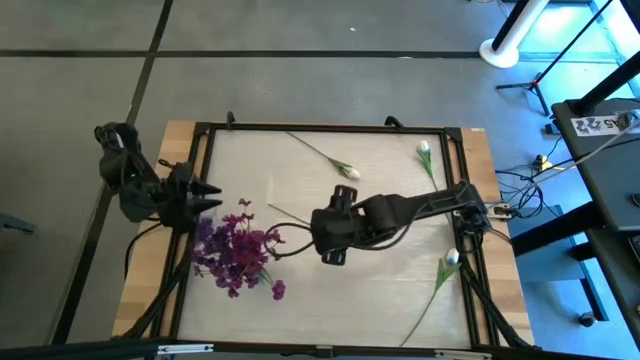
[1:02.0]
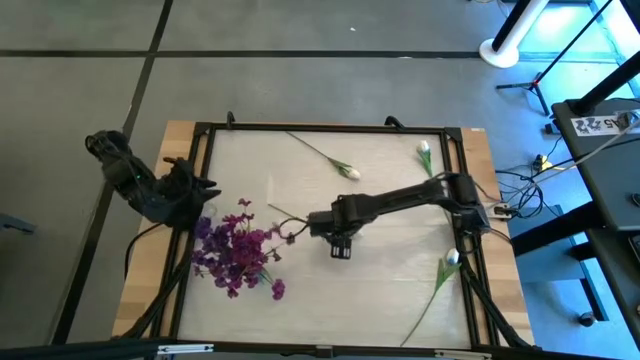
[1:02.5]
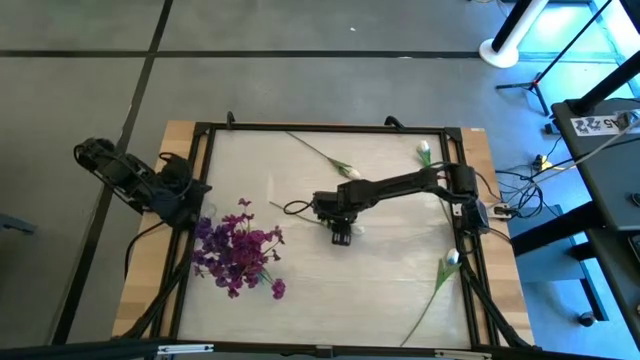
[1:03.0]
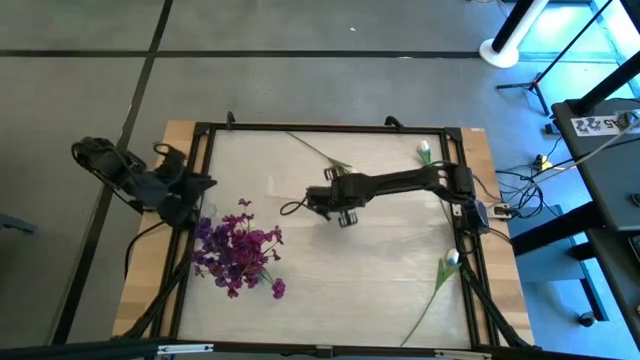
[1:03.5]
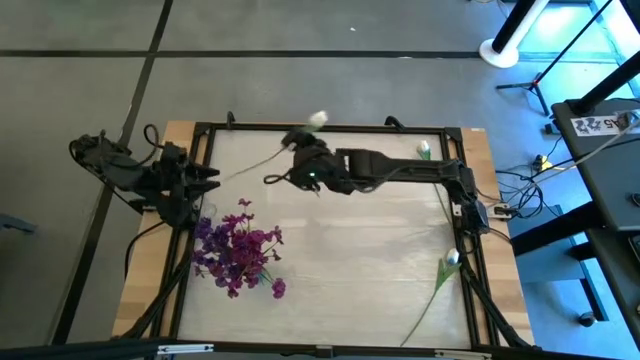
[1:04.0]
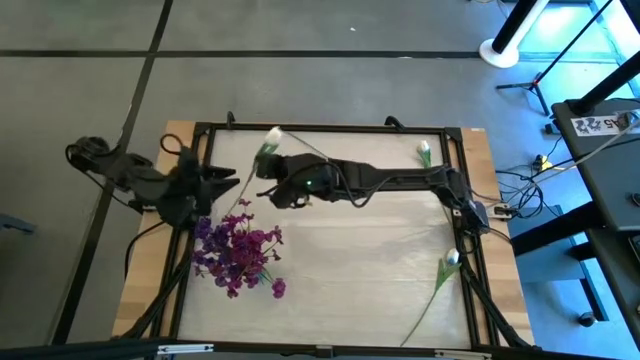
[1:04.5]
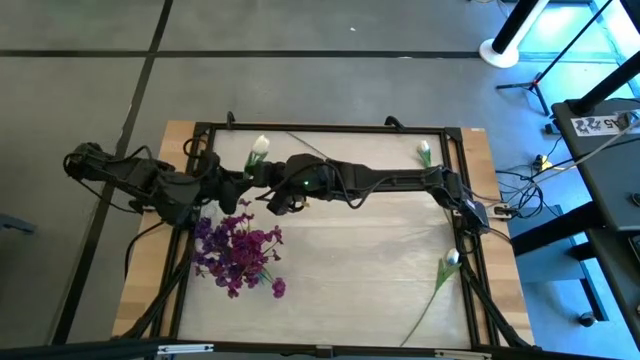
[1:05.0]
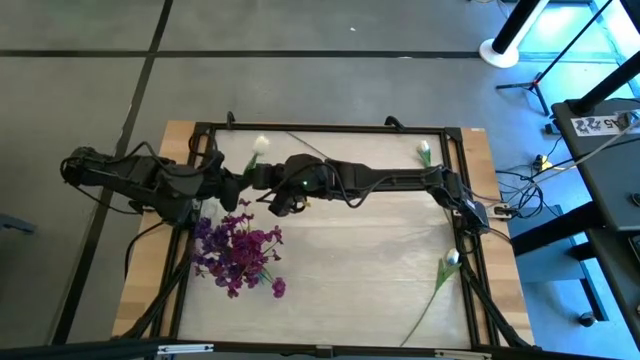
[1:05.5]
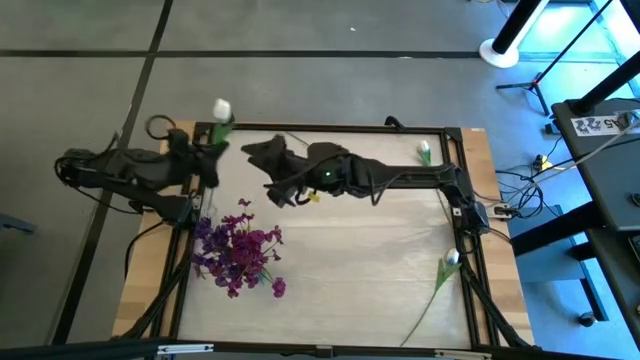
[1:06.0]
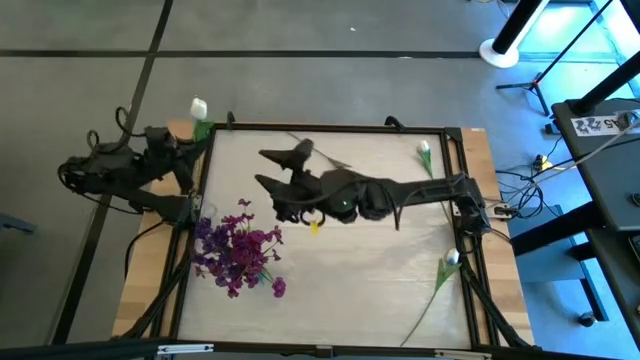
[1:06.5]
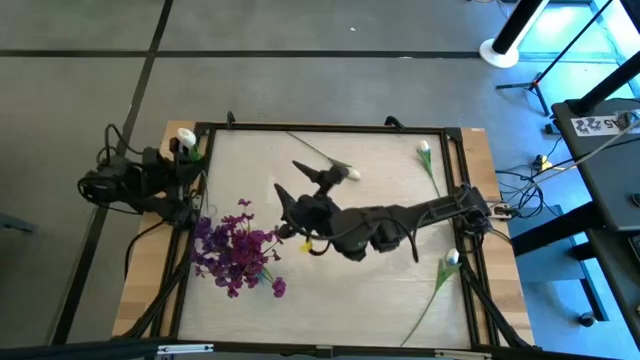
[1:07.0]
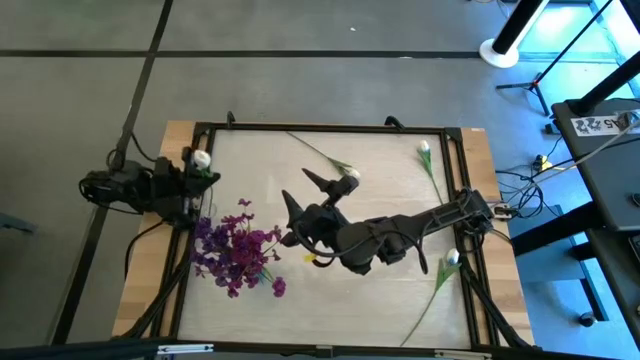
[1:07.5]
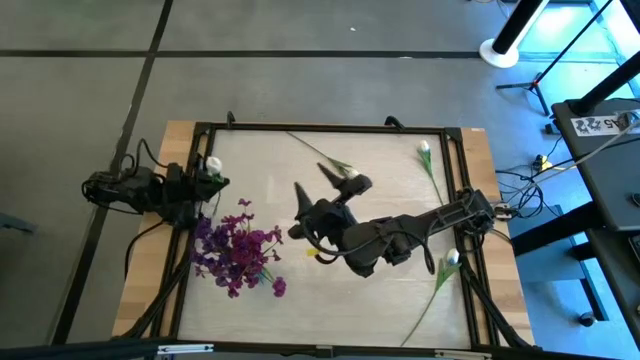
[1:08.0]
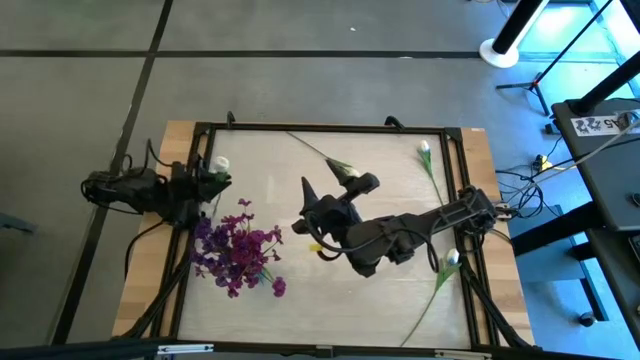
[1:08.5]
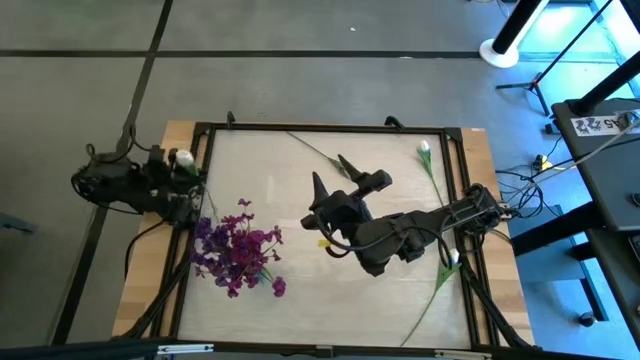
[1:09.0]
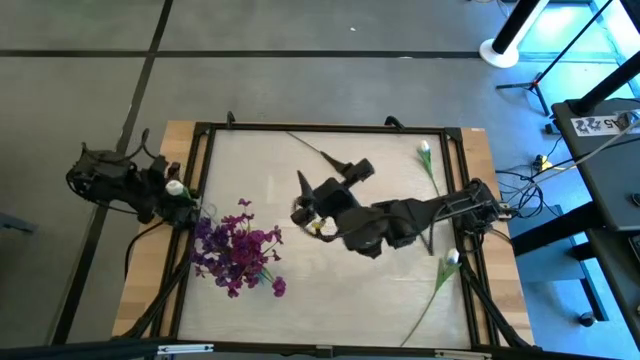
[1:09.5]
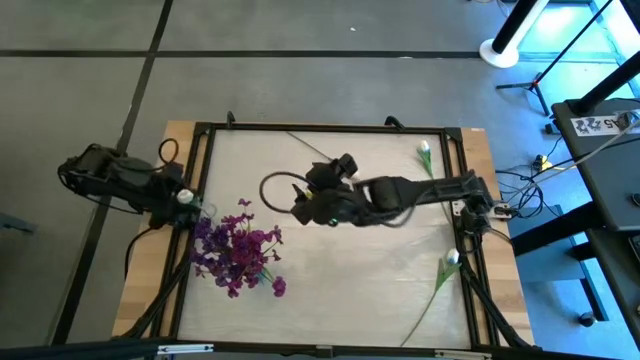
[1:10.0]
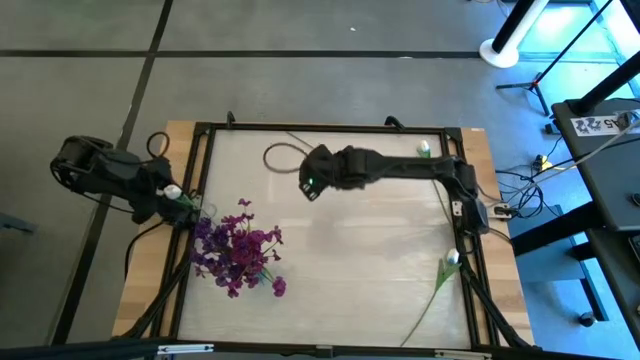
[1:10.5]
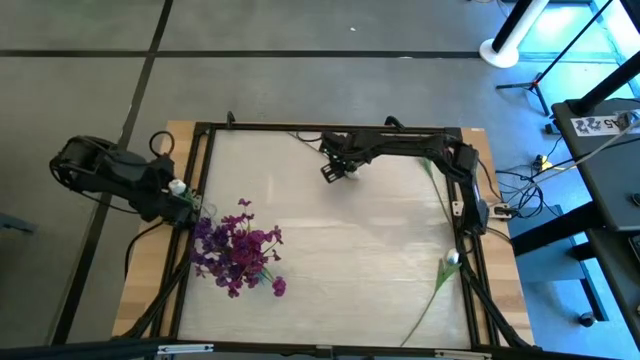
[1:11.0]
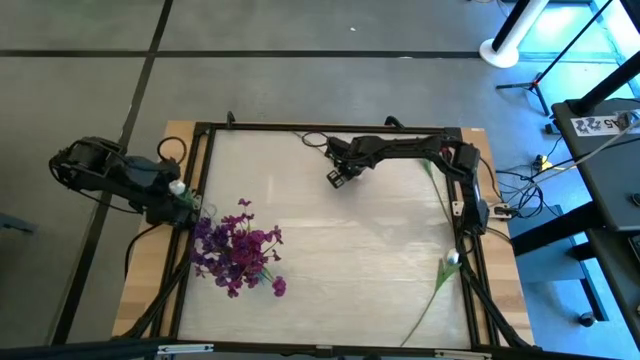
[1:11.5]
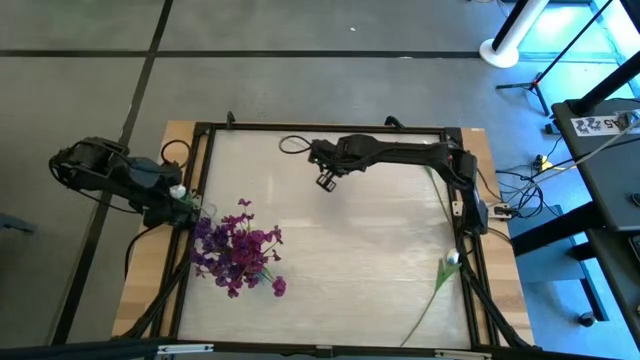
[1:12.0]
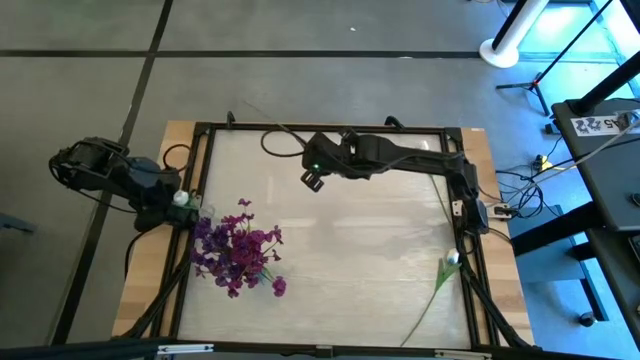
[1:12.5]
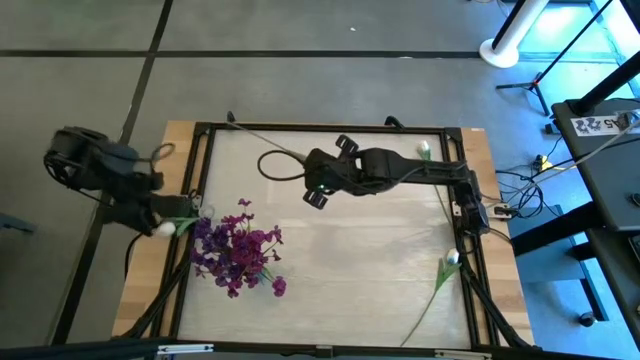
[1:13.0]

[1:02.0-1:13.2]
Task: Sort flowers into vase by color
Put the center white flower into the transparent vase

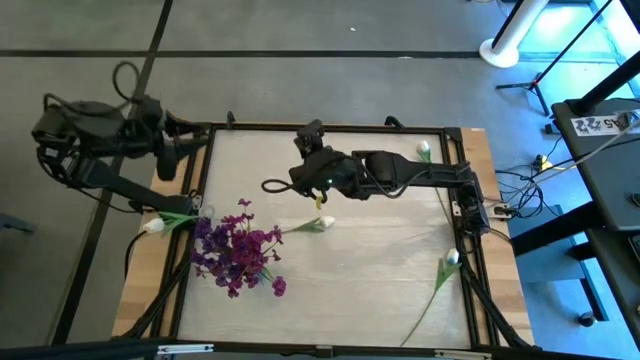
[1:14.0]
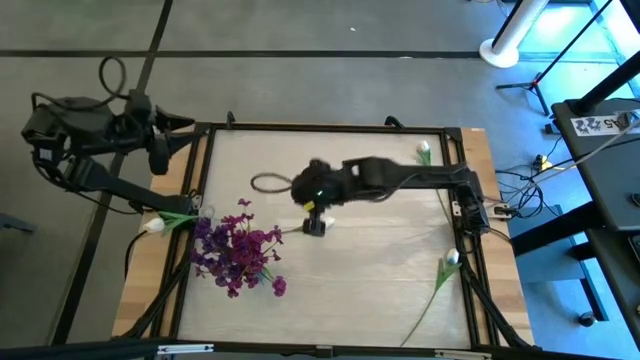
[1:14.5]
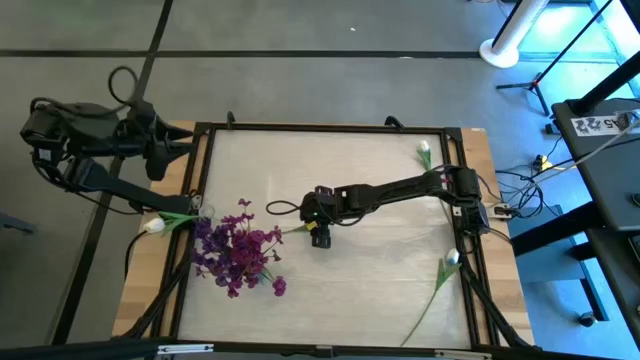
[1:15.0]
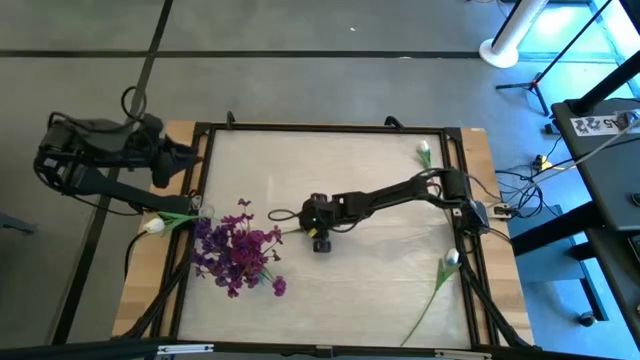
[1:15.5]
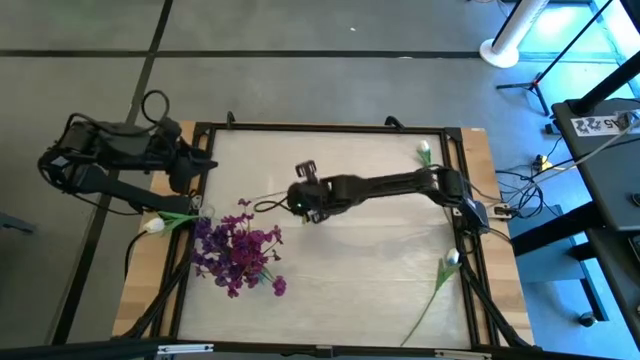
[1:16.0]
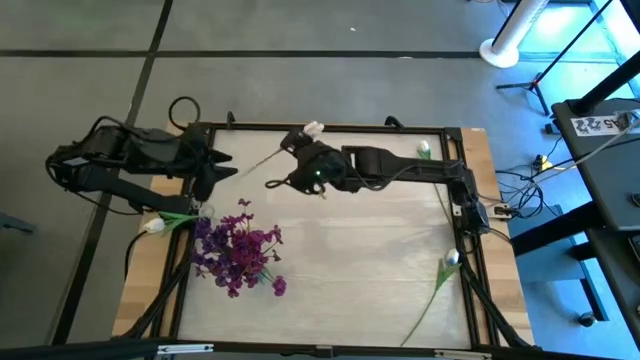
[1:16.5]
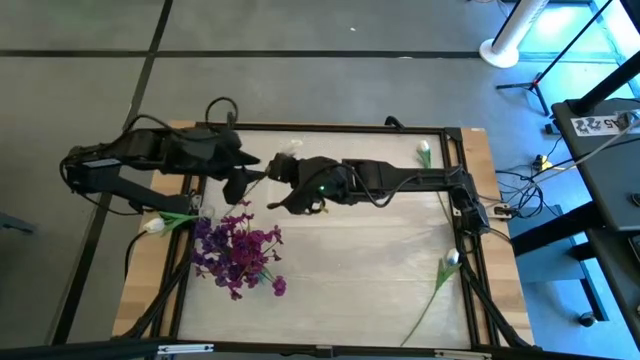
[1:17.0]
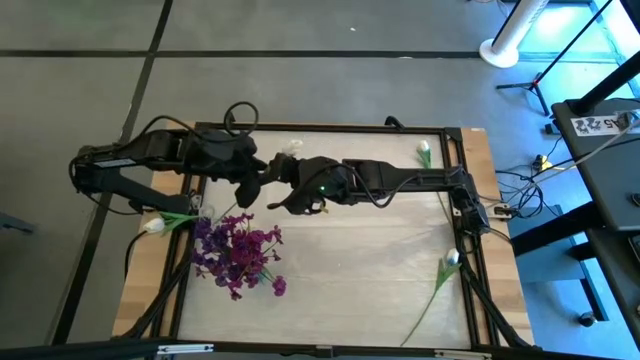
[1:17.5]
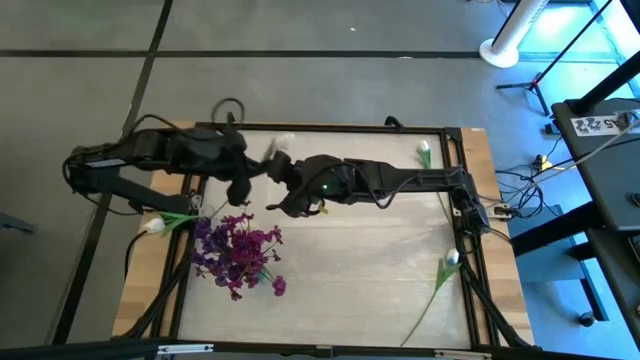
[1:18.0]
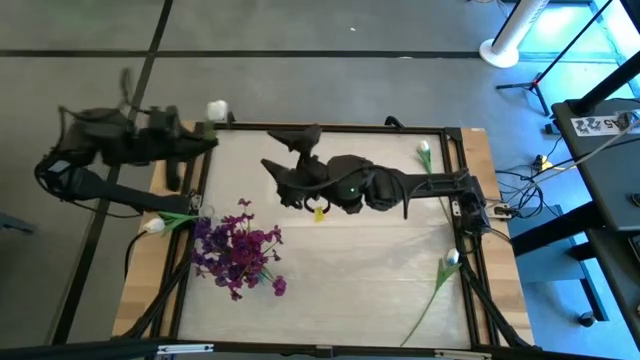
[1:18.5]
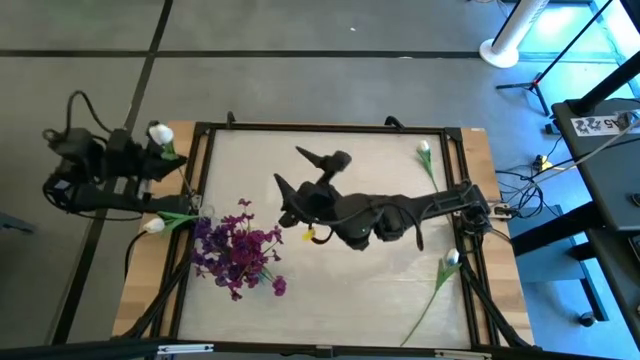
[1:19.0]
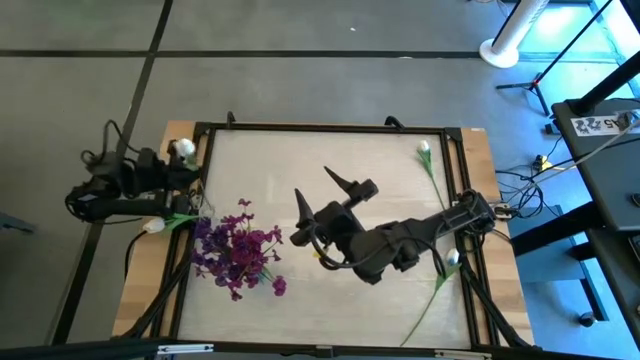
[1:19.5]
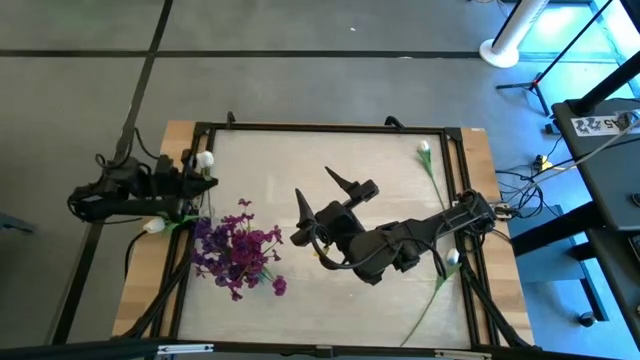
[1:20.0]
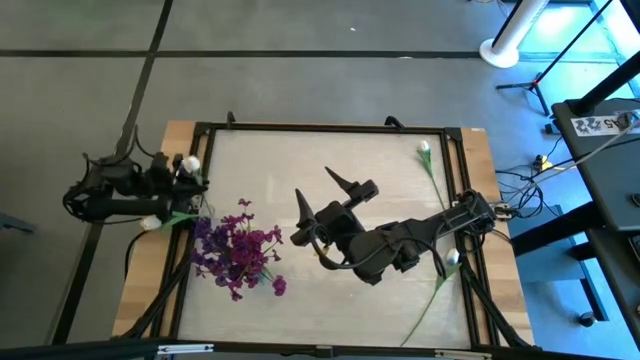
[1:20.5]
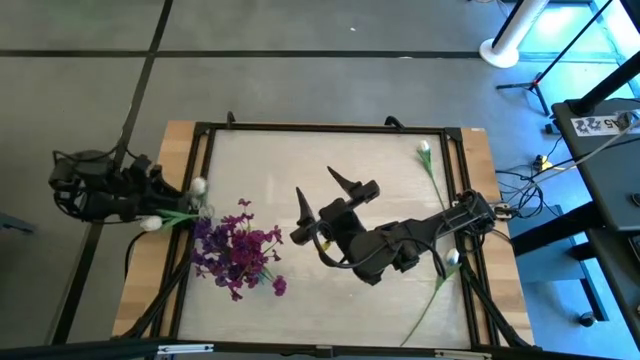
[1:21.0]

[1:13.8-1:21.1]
Put the top center white flower into the transparent vase

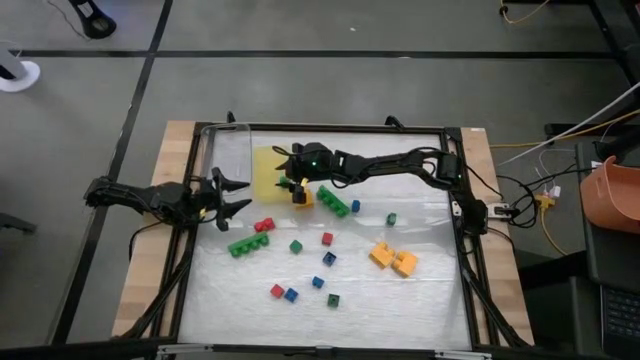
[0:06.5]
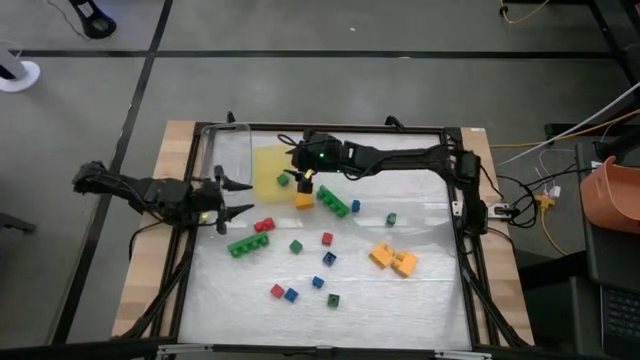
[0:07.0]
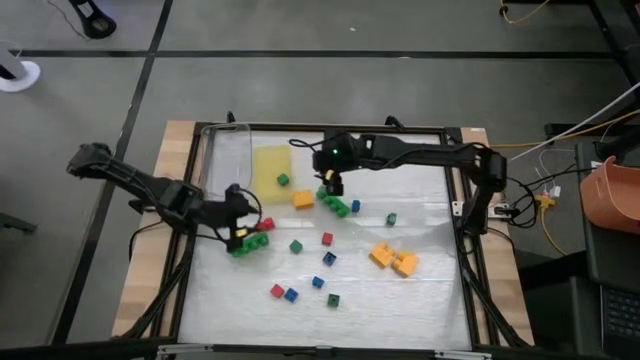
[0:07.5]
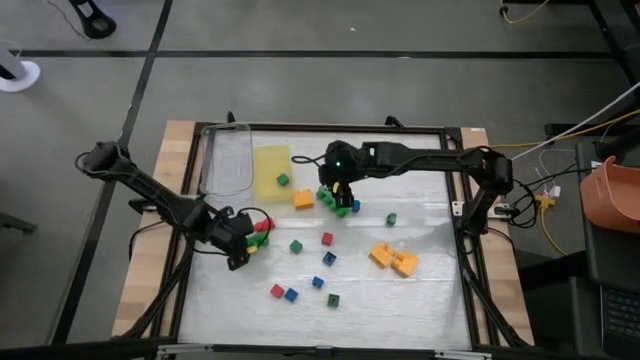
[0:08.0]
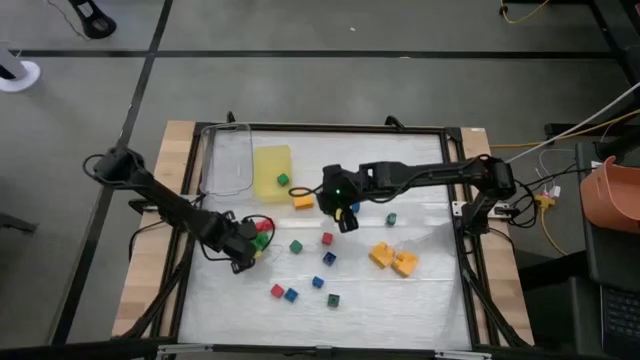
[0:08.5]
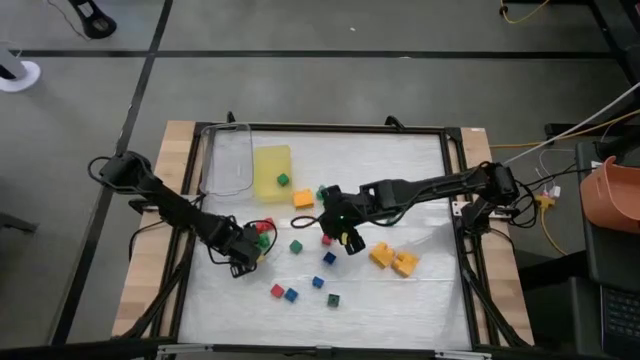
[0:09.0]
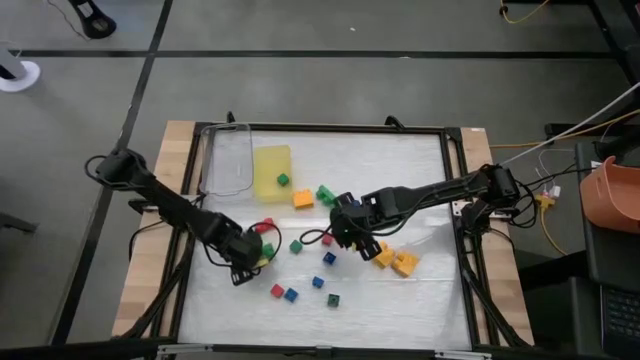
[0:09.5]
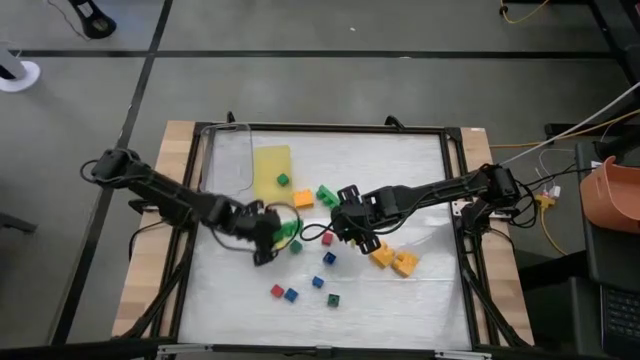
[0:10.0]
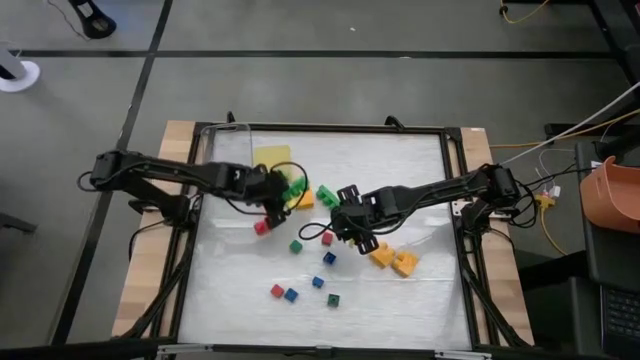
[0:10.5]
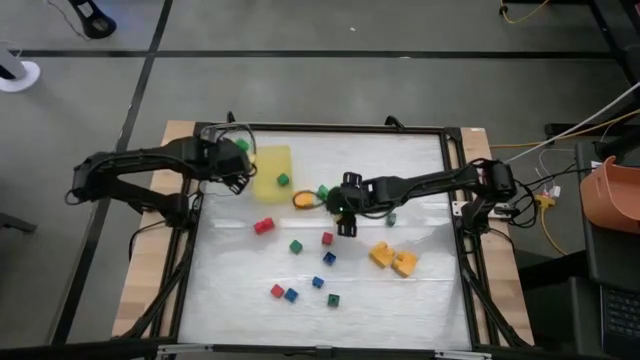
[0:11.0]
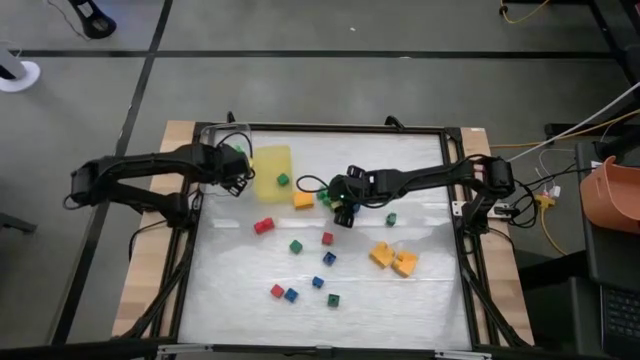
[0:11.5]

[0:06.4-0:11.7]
Task: Sort blocks by size
Put the large green game piece into the transparent bin
